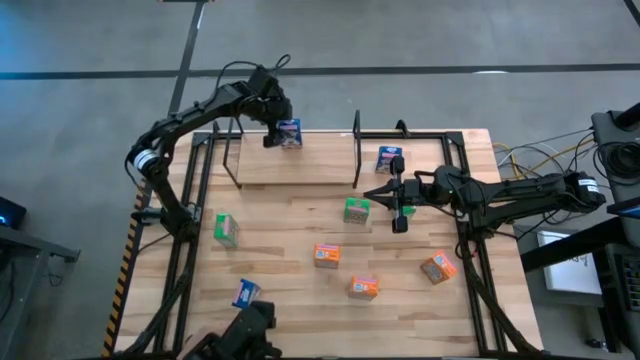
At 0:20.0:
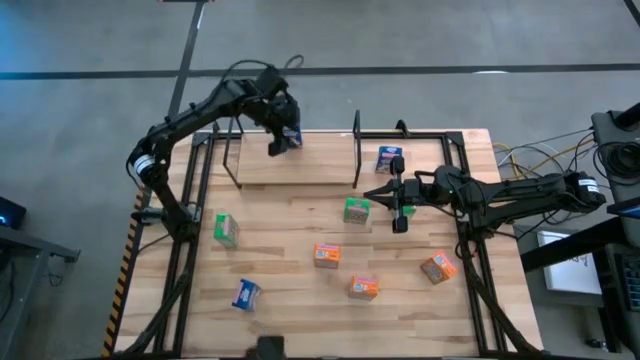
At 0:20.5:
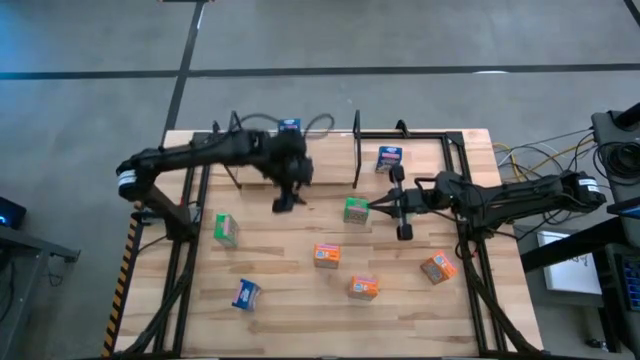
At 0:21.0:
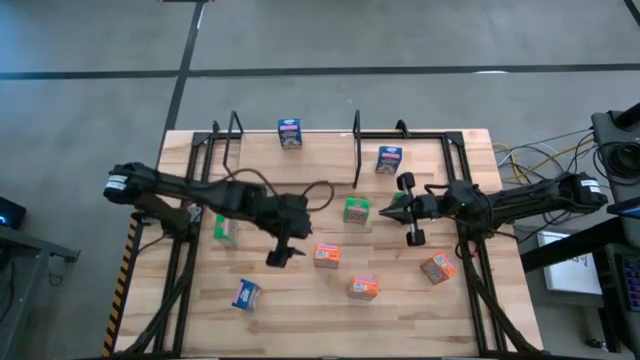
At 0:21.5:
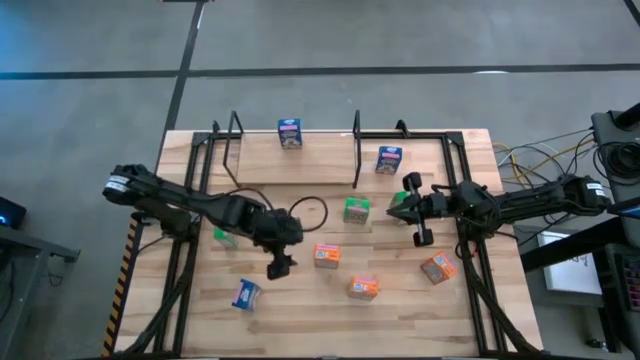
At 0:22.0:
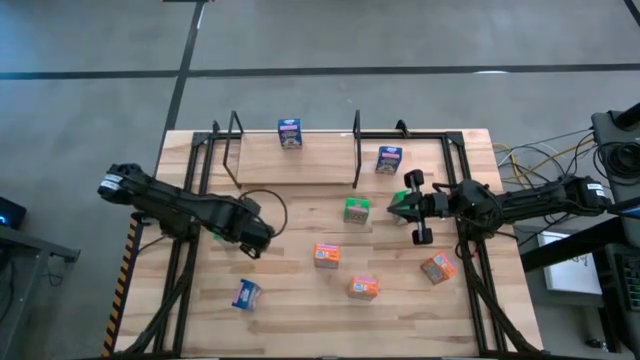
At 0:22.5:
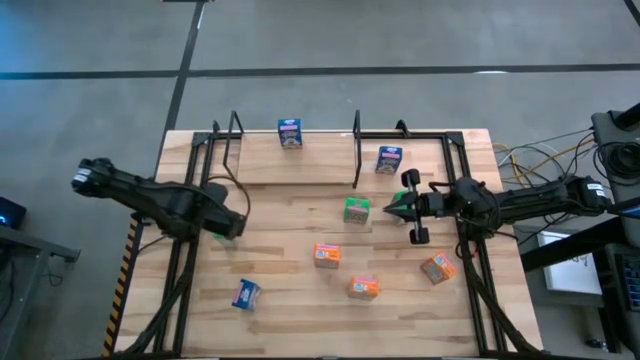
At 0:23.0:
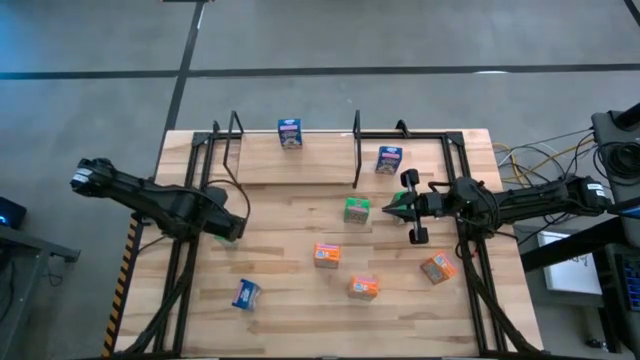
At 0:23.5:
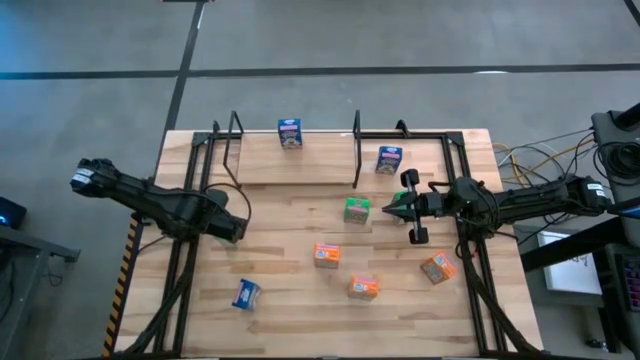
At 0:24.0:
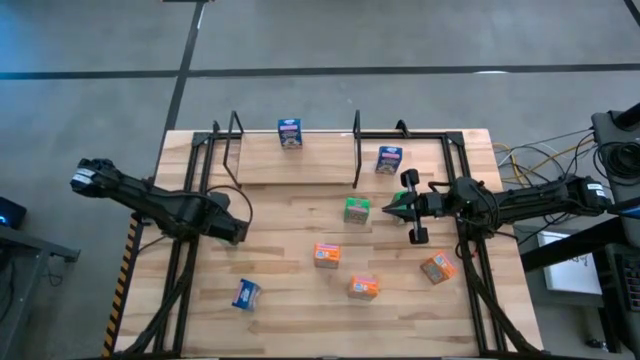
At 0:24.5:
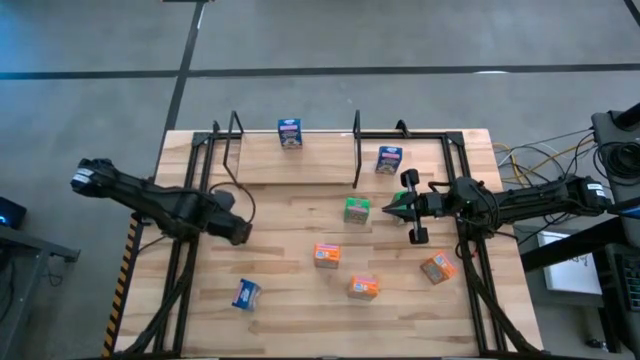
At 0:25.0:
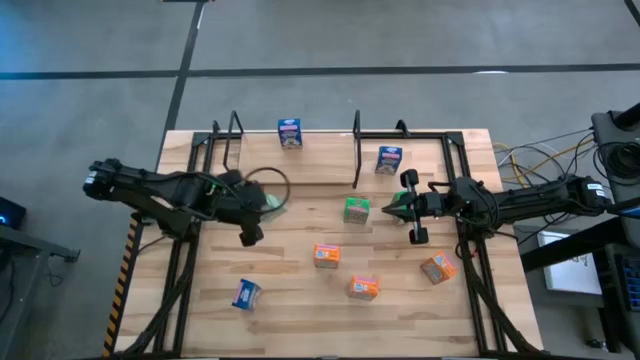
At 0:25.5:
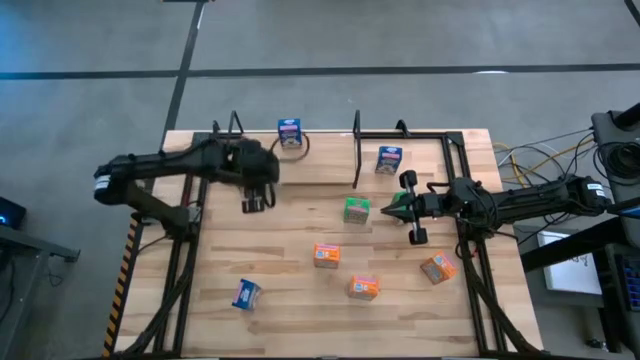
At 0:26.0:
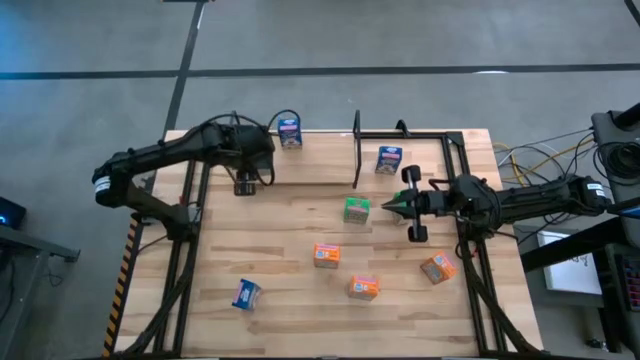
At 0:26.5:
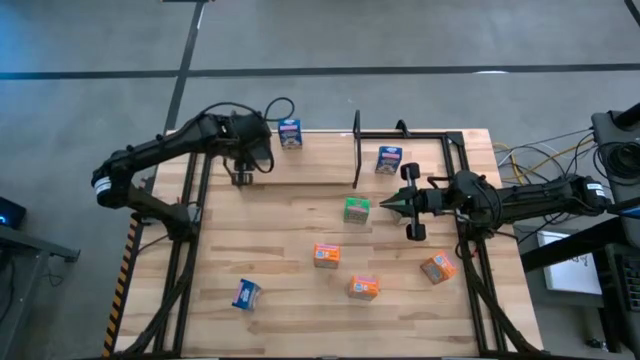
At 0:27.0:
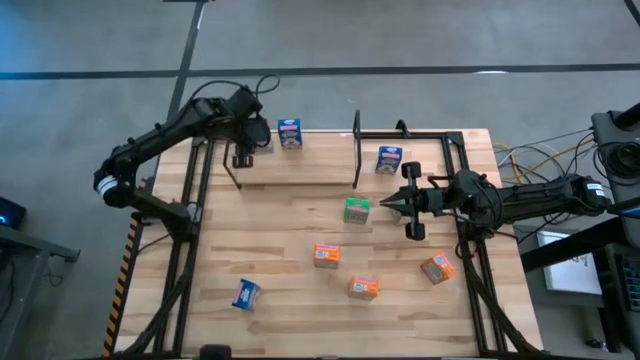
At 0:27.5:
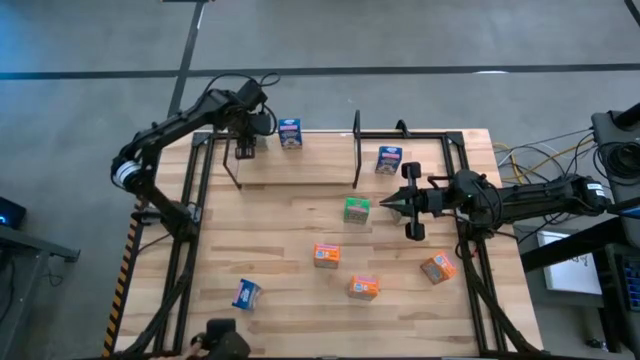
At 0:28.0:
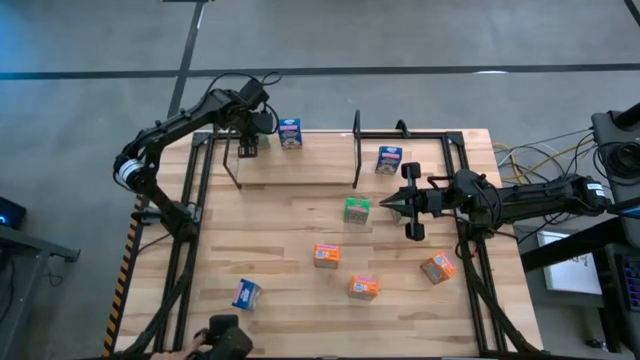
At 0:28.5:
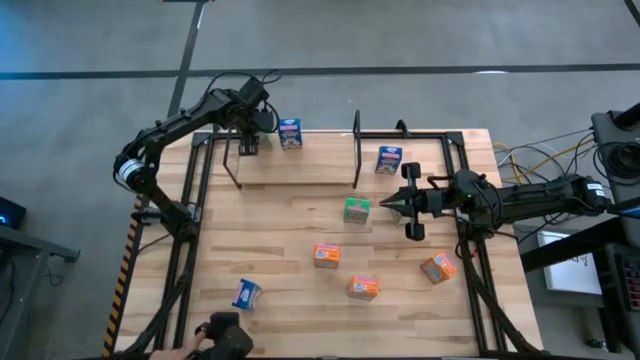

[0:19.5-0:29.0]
Task: Stack cereal on shelf
Put the bottom left green cereal box on the shelf

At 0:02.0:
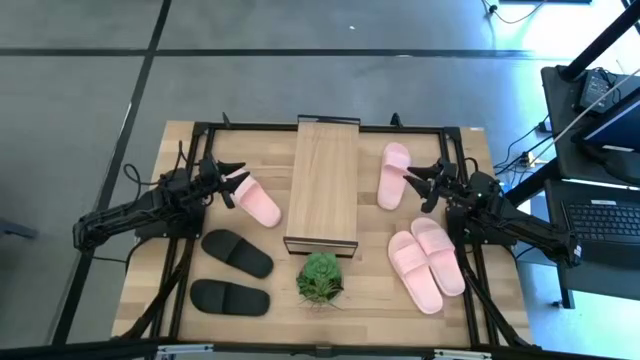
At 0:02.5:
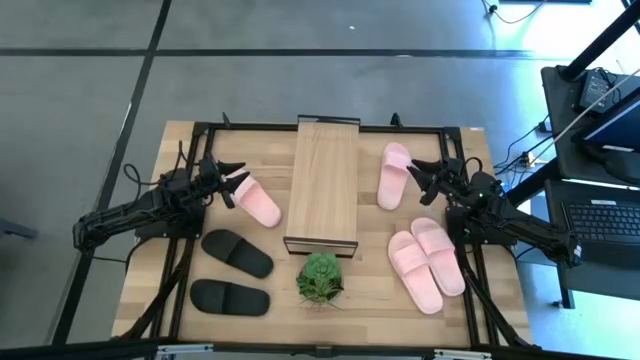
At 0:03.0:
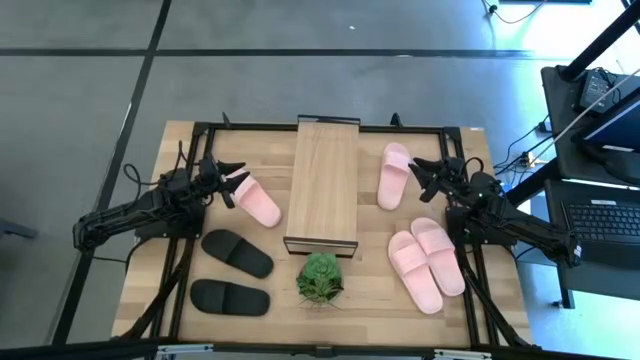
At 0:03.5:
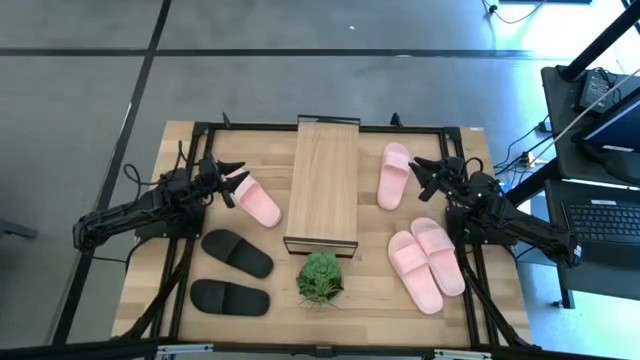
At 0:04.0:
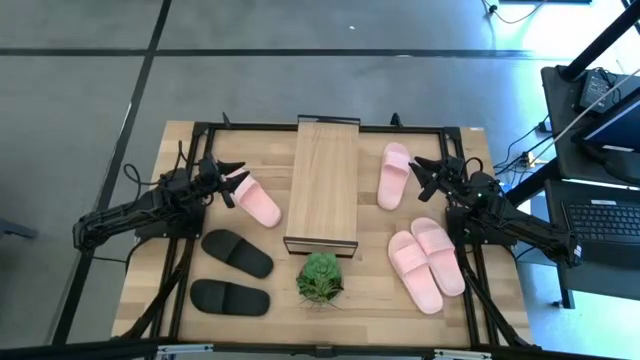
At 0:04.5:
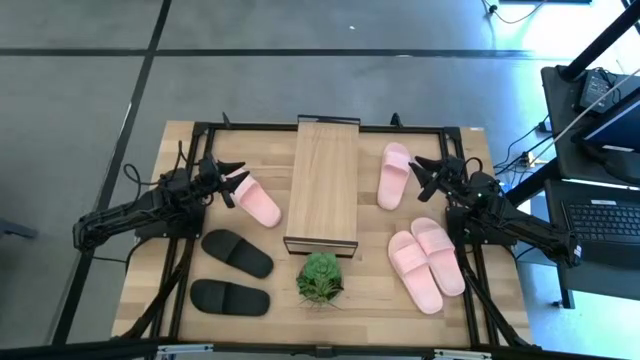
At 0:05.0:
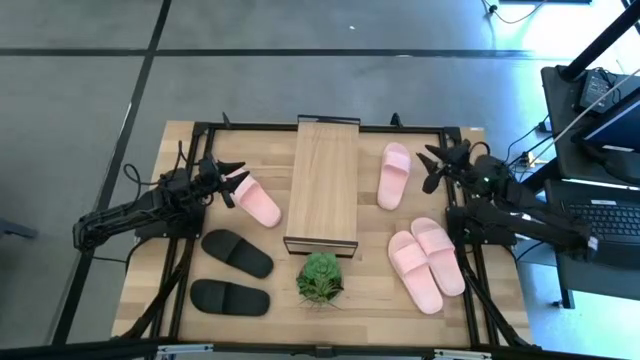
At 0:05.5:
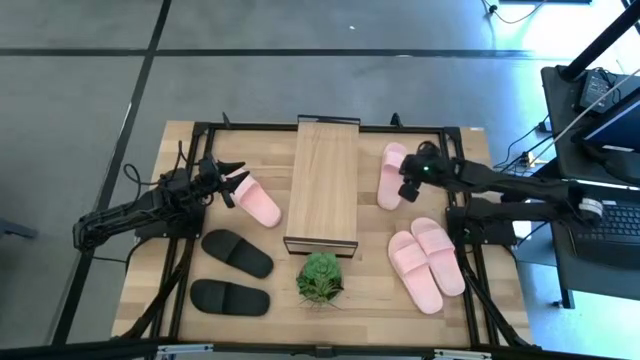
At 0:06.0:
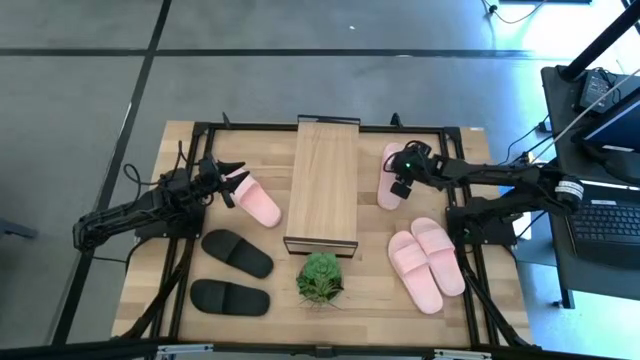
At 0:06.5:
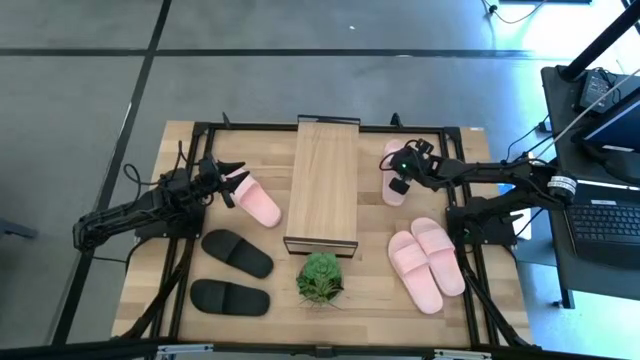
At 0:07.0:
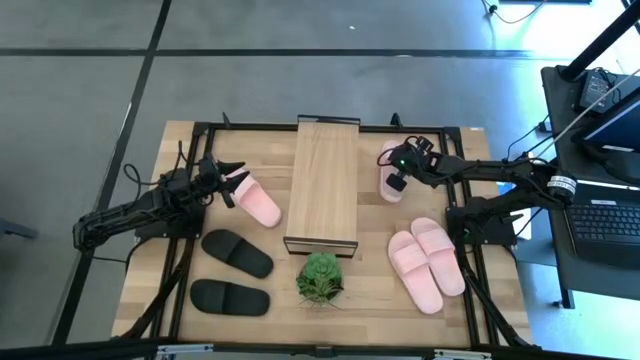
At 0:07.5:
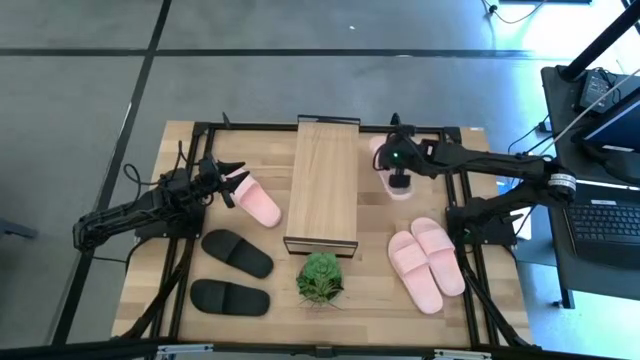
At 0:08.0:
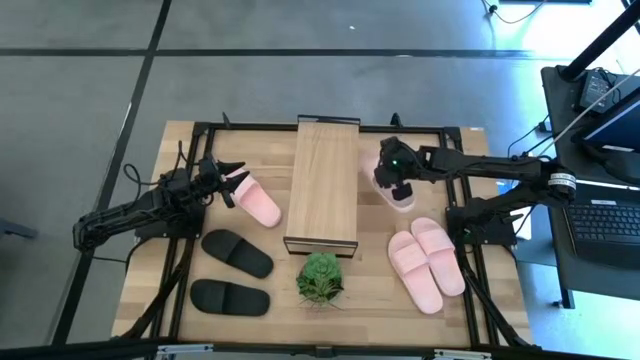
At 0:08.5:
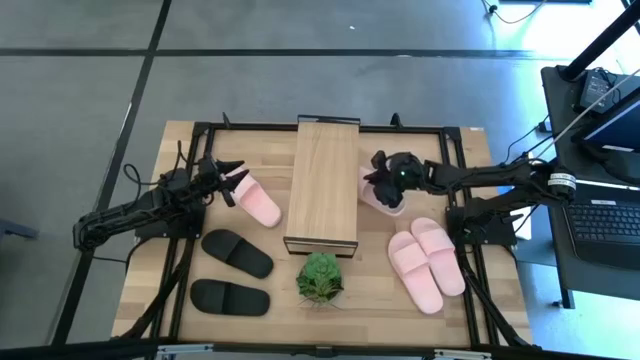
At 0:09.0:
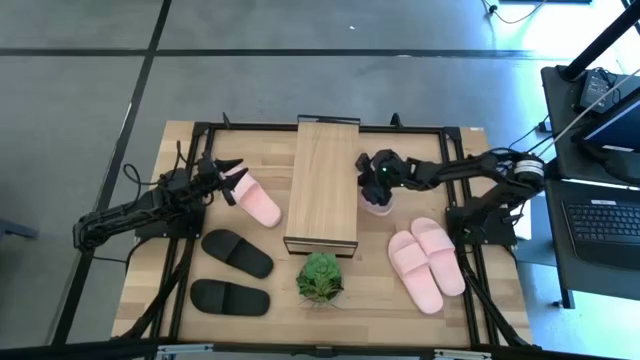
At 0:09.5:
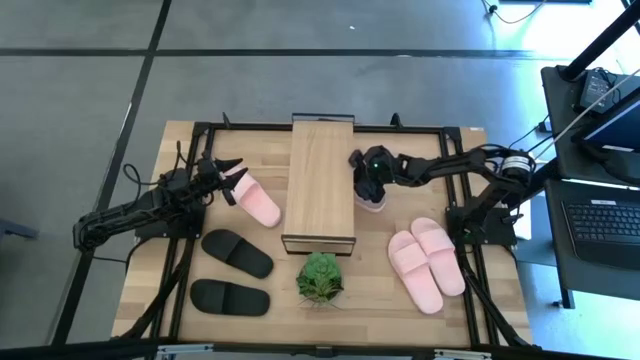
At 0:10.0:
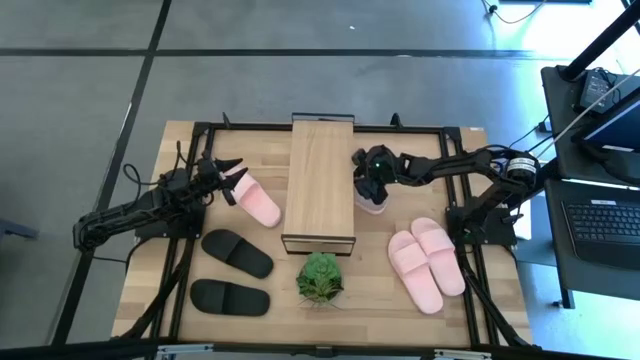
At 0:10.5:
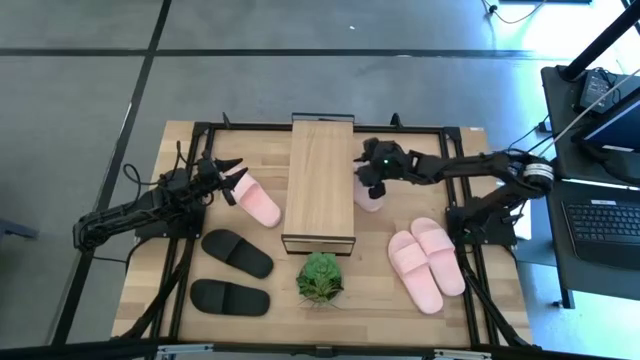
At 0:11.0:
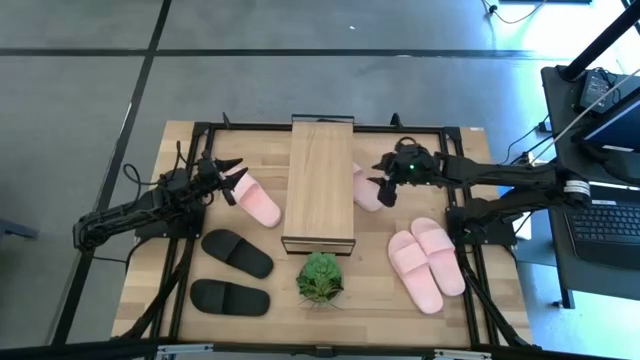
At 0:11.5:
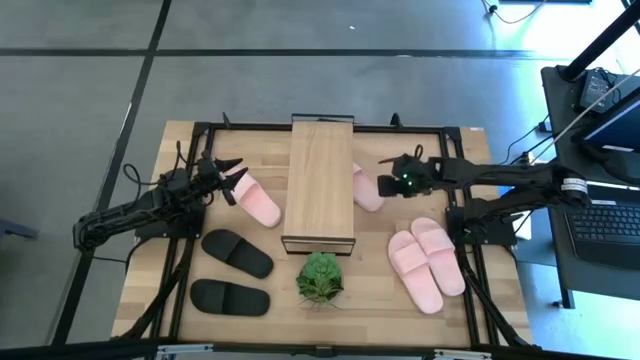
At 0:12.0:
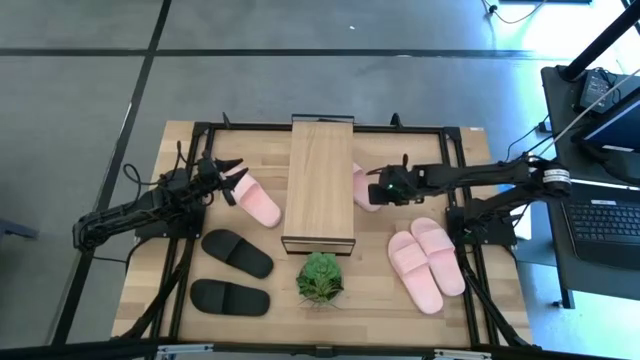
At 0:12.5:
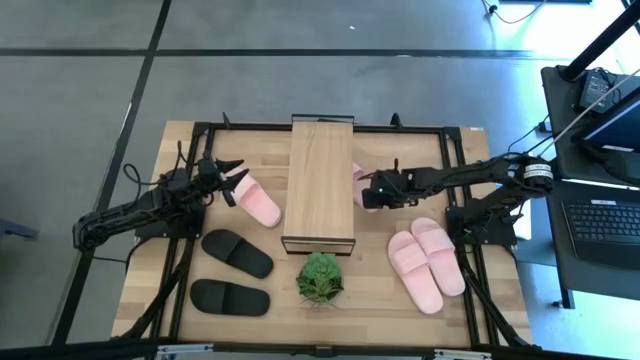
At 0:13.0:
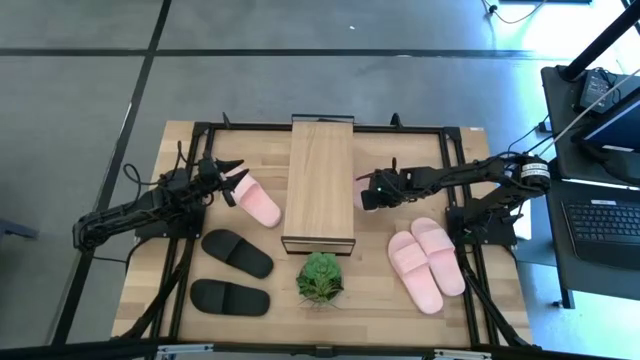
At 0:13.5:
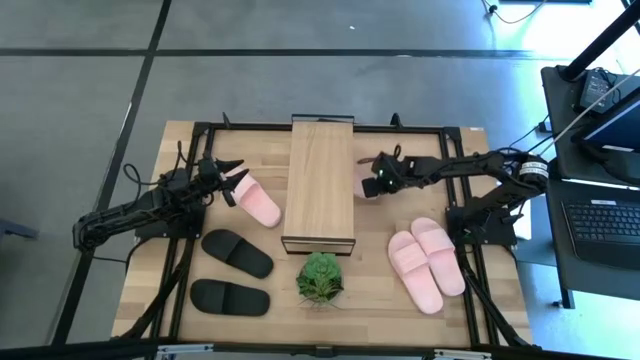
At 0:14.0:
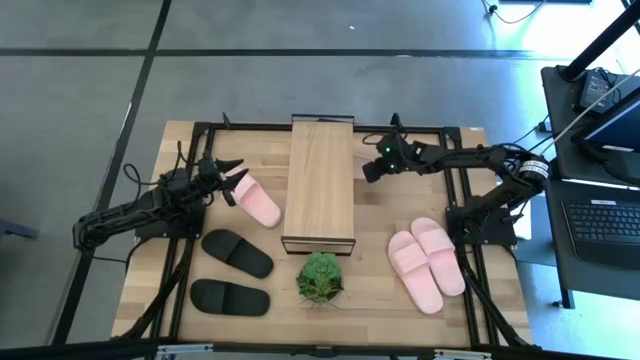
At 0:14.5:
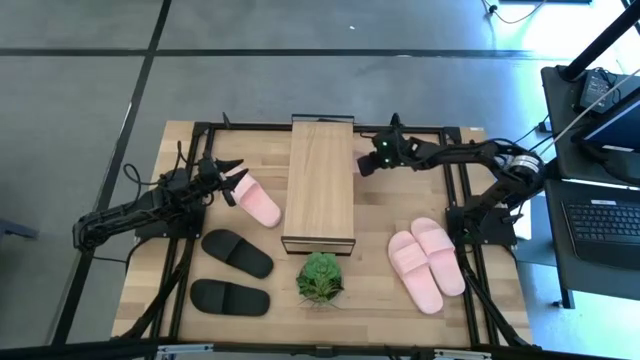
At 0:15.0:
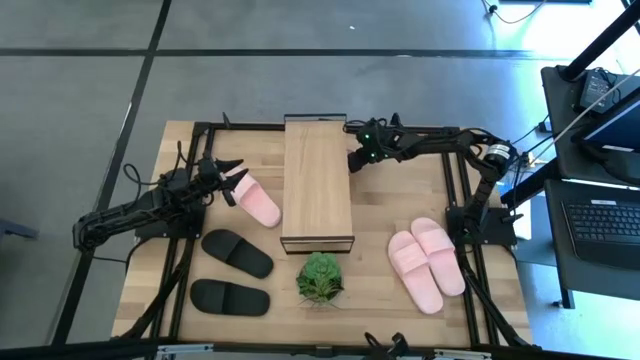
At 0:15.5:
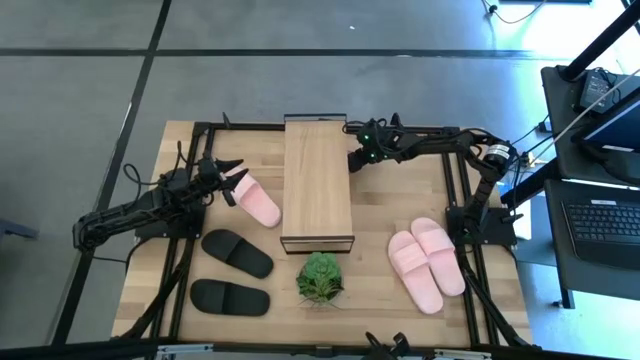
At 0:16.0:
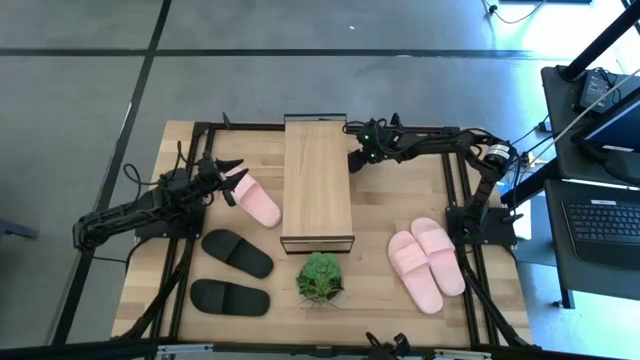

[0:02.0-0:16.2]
Task: Pick and place slides into the shelf
Put the pink slipper under the shelf
